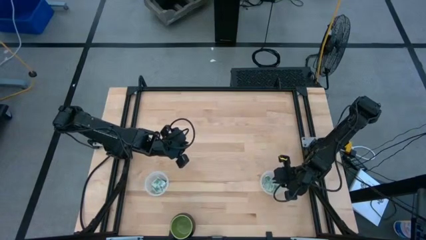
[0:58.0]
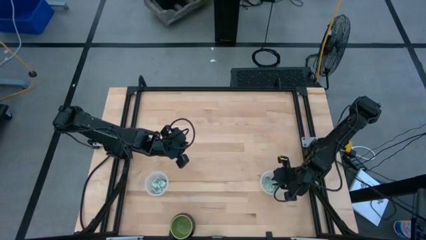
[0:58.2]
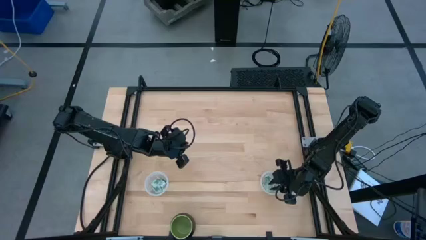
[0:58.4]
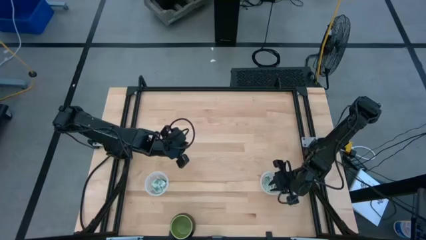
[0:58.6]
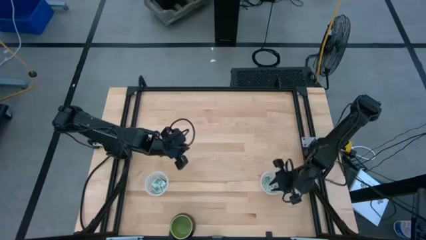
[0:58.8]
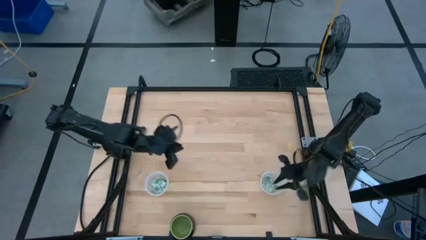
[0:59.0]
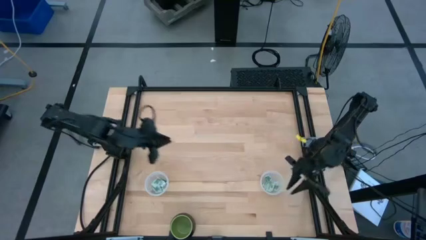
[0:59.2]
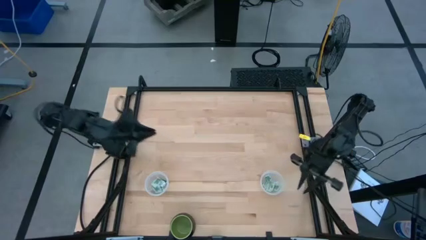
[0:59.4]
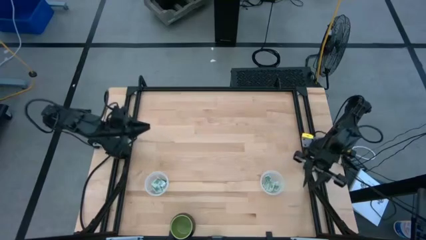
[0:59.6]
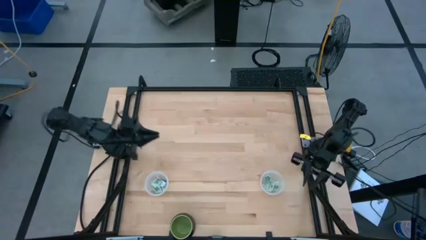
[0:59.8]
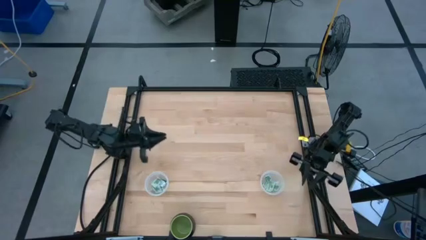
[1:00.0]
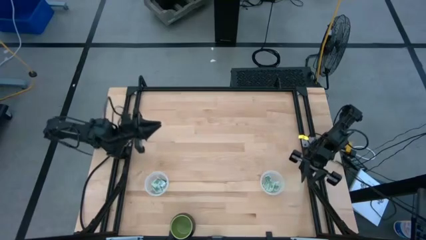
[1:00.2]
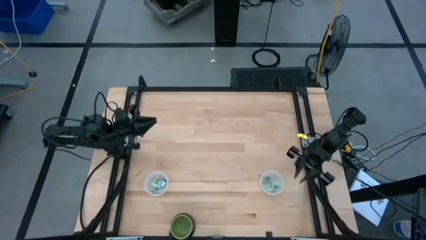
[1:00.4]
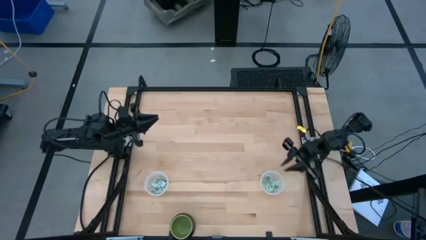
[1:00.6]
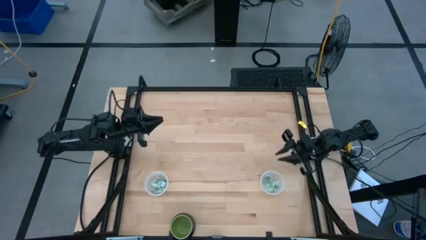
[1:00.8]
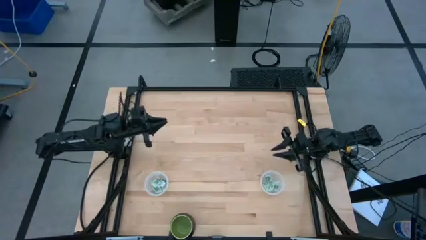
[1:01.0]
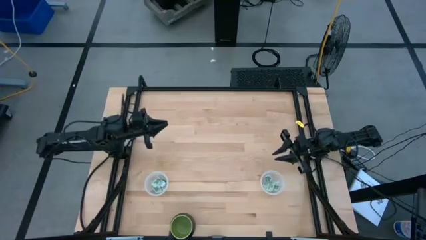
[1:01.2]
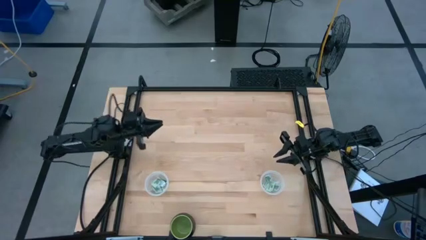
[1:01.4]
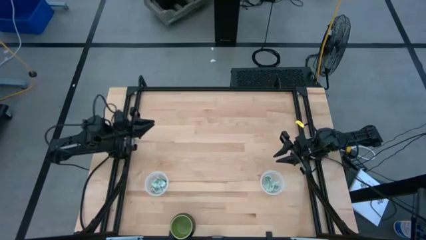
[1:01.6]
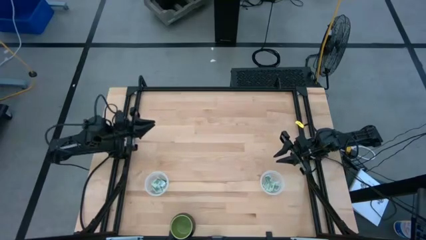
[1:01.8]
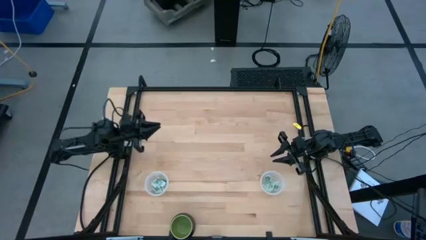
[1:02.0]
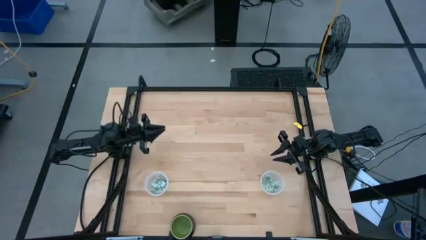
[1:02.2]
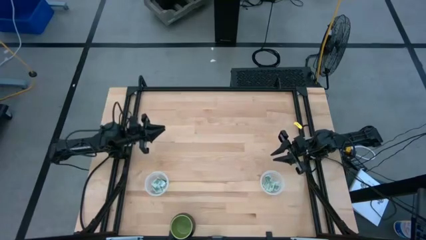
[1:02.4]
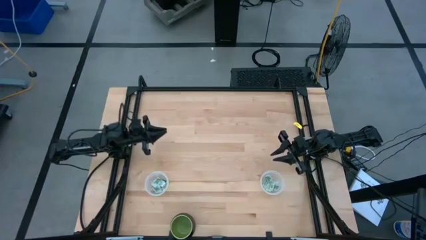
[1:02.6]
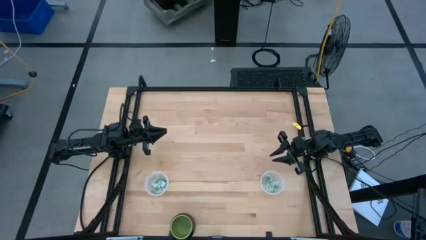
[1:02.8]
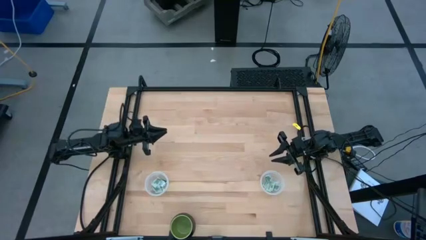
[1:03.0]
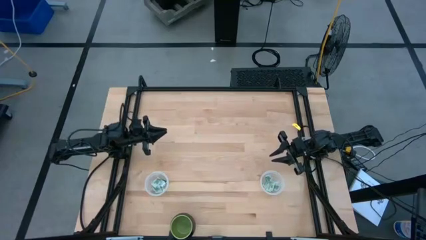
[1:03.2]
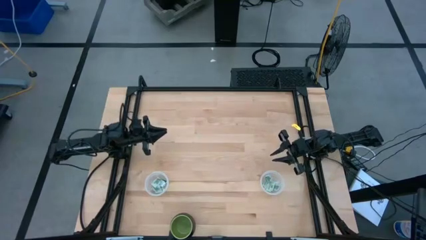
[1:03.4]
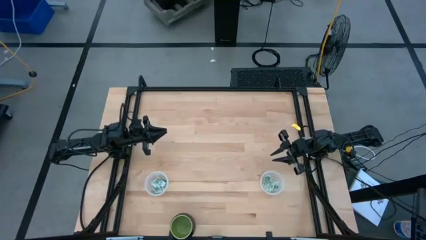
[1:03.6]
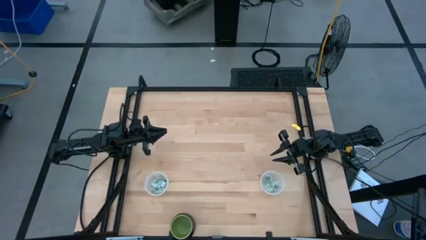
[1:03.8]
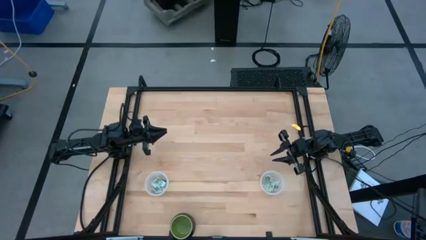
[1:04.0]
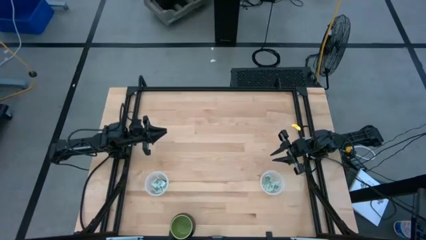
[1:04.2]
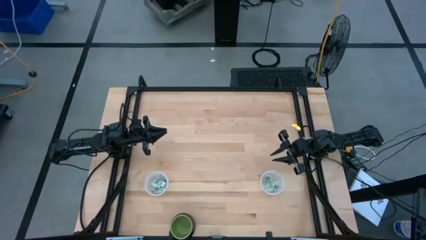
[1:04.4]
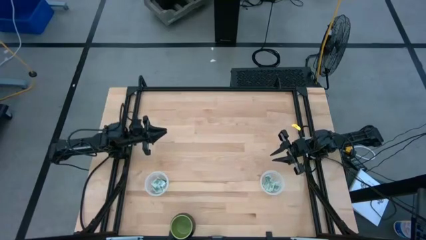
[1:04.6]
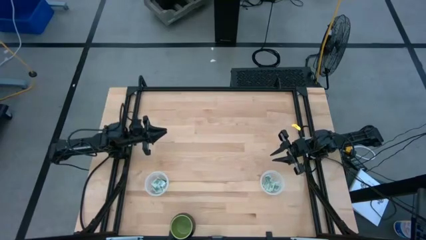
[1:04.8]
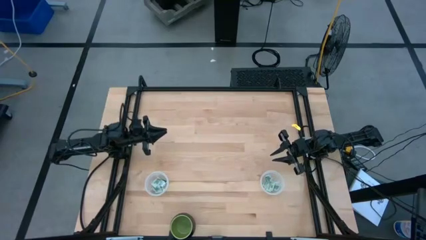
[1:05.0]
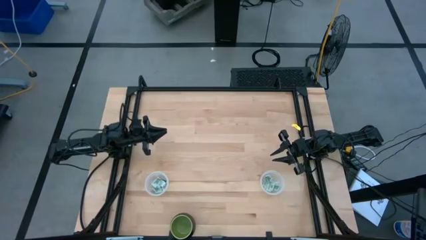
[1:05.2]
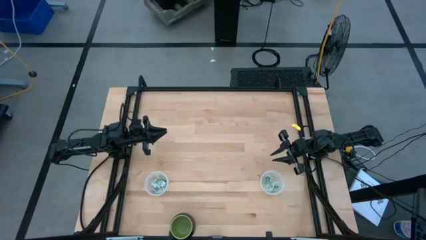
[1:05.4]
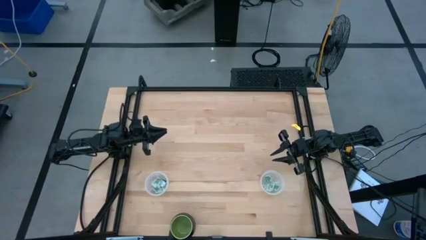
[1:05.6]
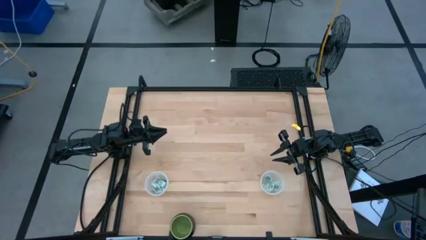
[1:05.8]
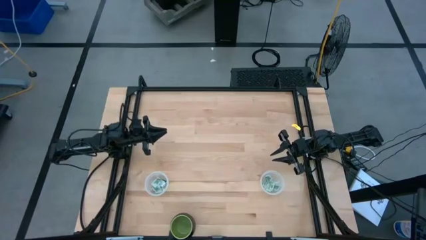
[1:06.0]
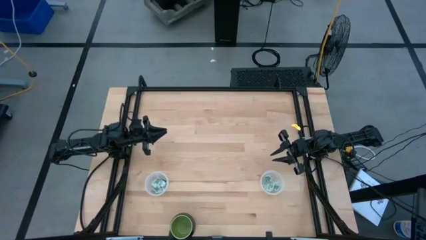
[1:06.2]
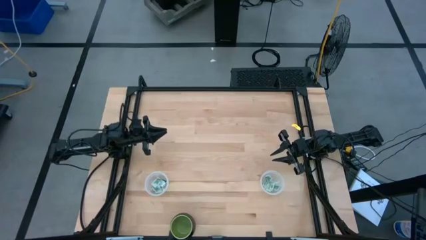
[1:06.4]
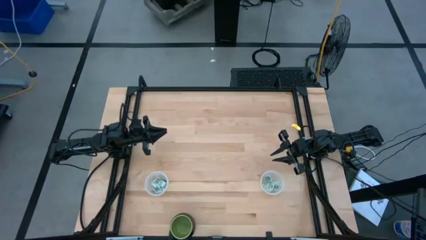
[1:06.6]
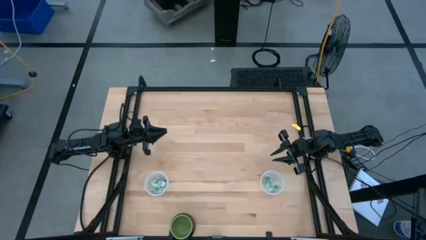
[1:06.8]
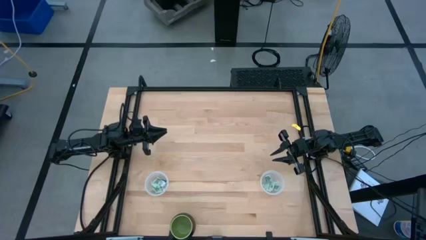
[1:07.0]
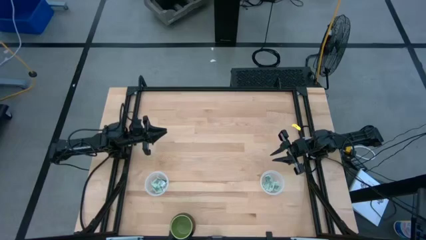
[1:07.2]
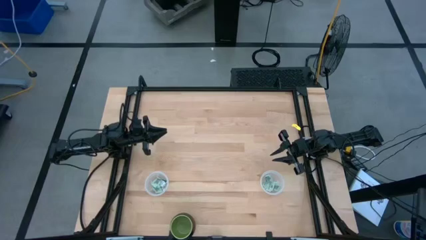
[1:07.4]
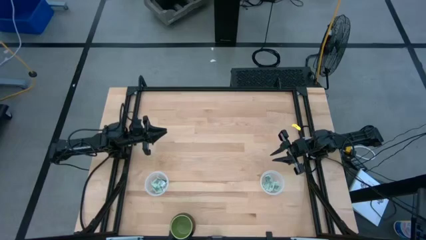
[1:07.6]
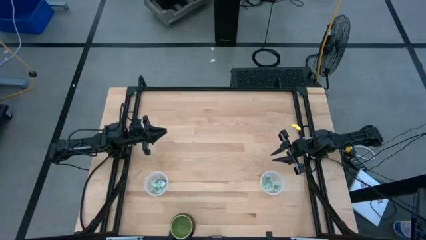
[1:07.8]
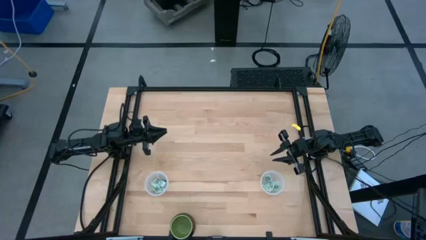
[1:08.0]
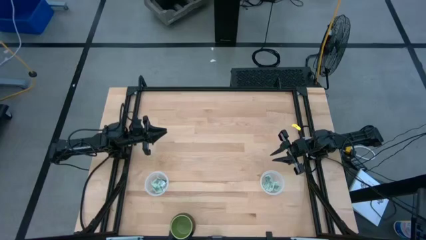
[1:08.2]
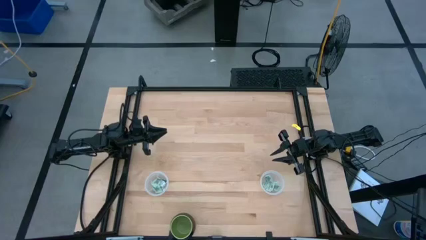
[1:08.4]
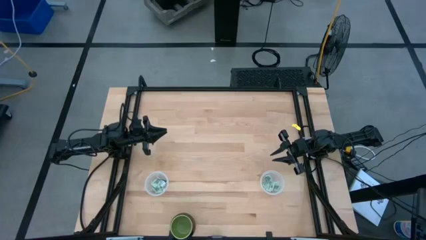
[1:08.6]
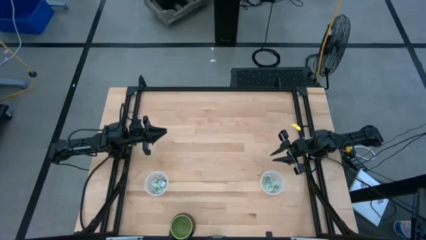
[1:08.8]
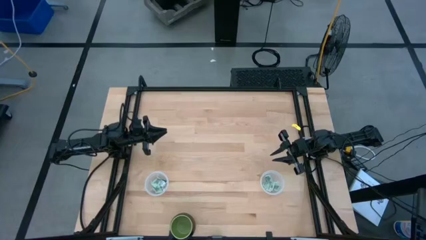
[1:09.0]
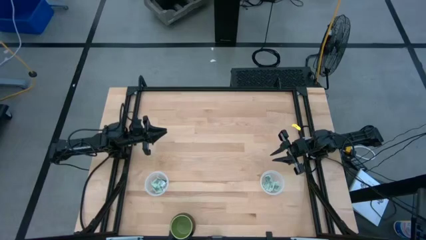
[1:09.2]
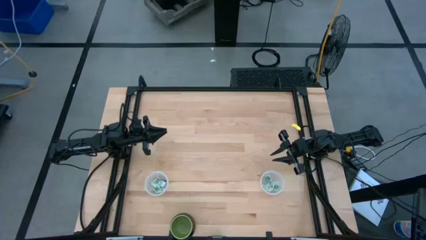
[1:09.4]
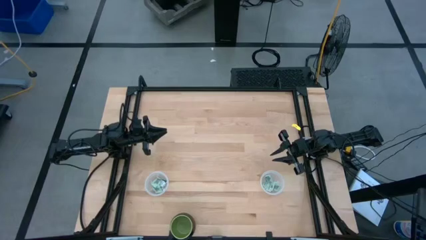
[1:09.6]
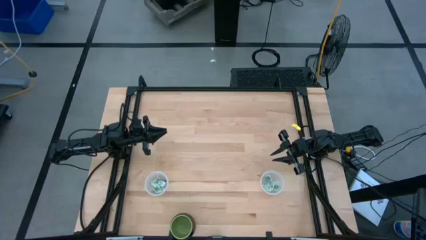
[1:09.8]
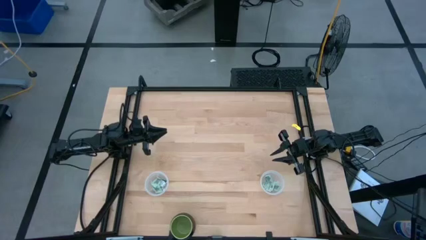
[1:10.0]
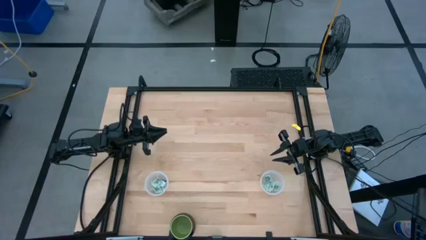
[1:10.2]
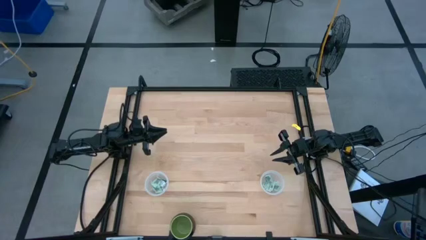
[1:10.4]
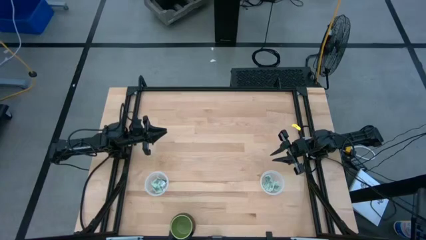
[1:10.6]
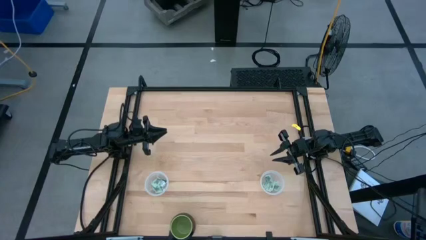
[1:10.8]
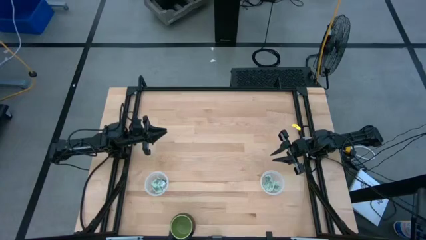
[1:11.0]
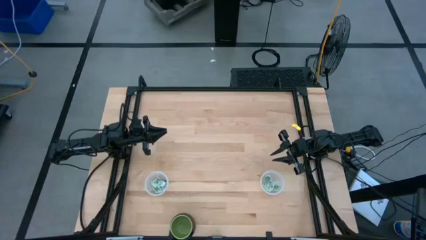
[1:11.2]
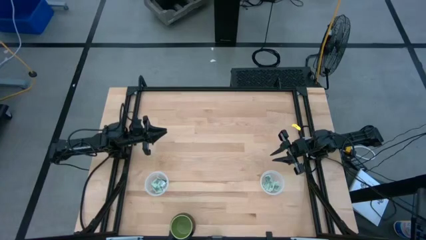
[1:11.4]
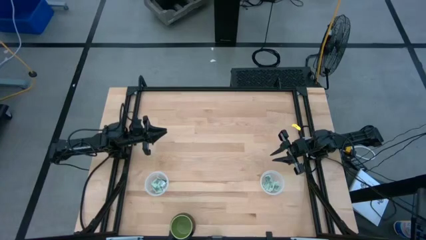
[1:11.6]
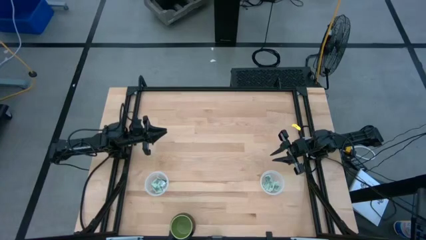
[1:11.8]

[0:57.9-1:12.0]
Task: Pick and place Stevia / Truvia into bins
Return to Home Position
